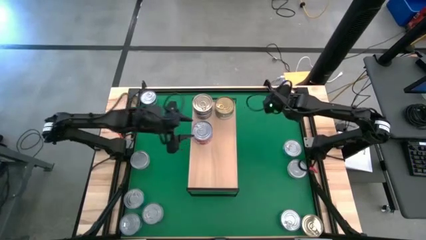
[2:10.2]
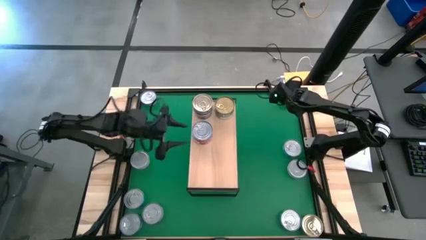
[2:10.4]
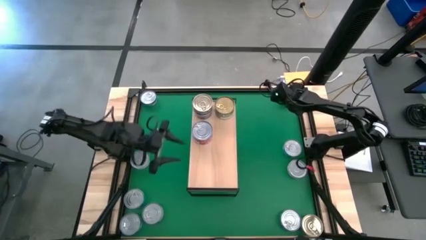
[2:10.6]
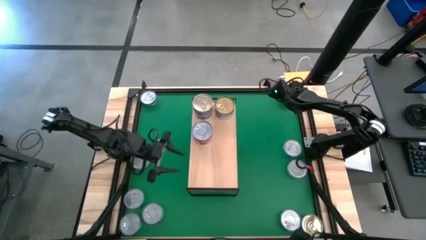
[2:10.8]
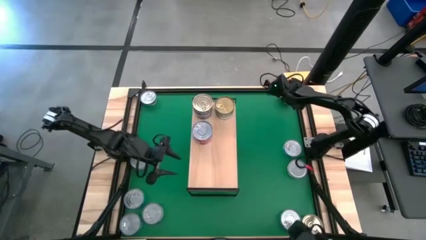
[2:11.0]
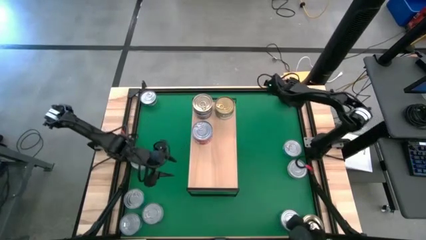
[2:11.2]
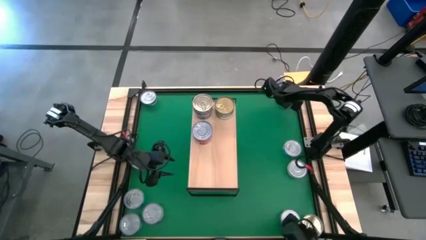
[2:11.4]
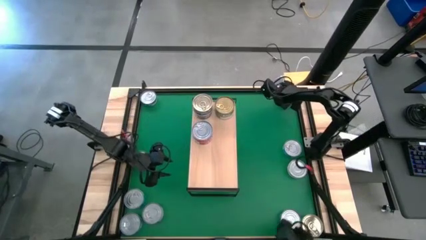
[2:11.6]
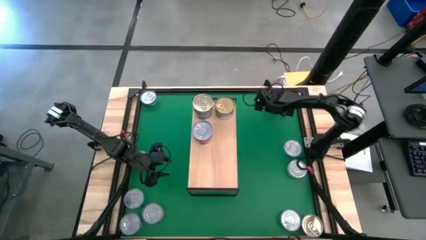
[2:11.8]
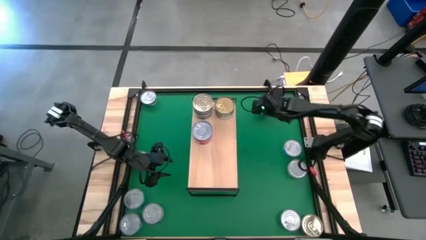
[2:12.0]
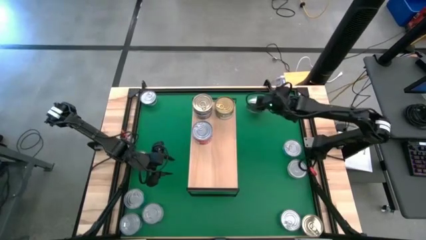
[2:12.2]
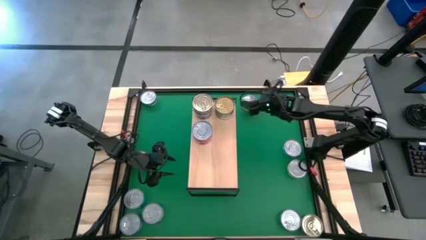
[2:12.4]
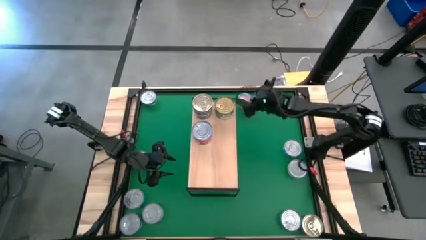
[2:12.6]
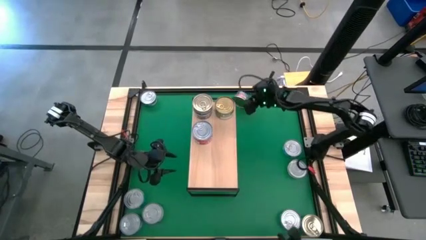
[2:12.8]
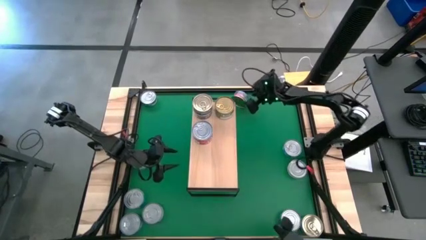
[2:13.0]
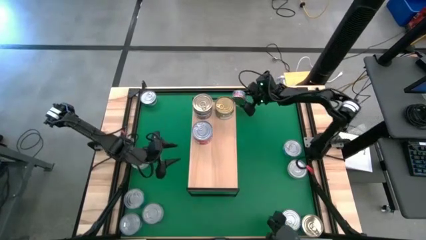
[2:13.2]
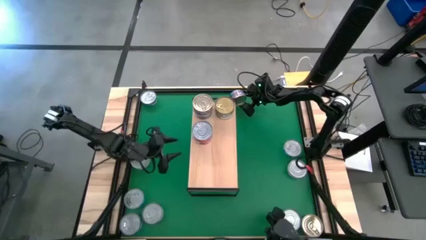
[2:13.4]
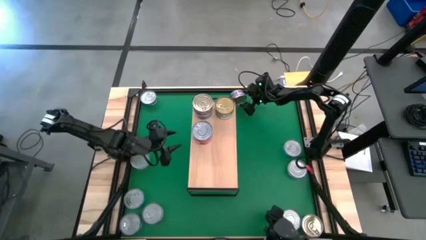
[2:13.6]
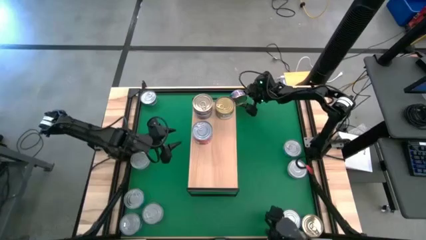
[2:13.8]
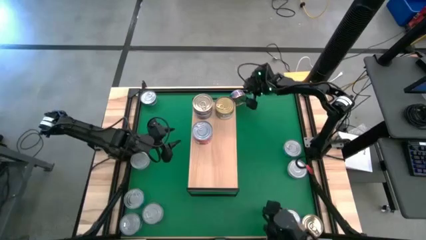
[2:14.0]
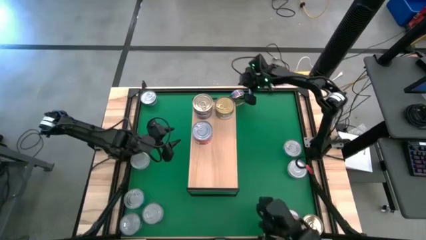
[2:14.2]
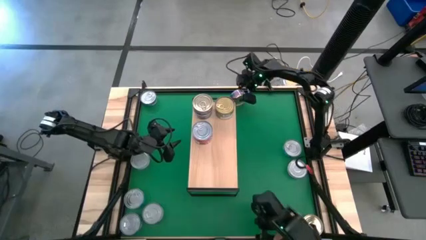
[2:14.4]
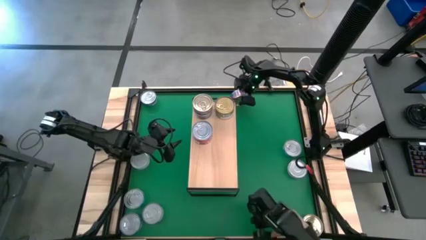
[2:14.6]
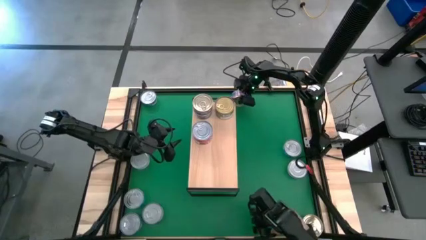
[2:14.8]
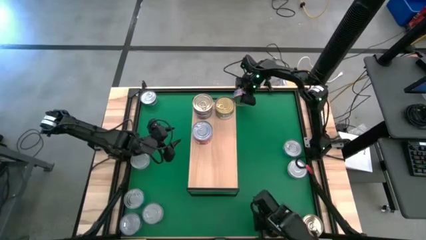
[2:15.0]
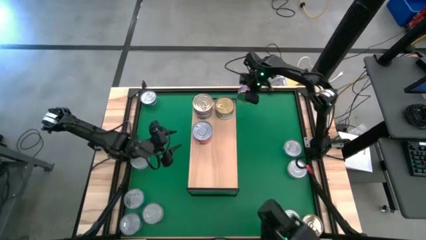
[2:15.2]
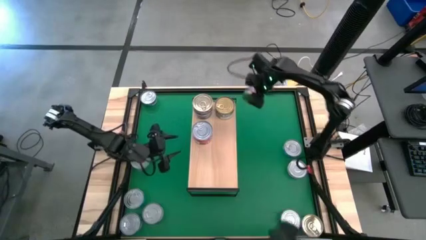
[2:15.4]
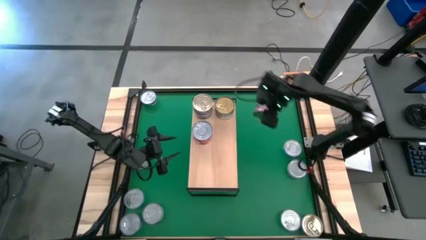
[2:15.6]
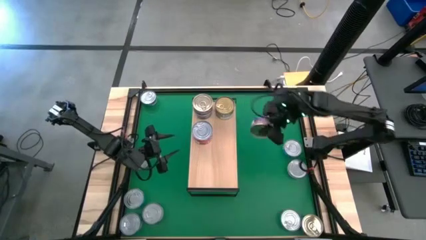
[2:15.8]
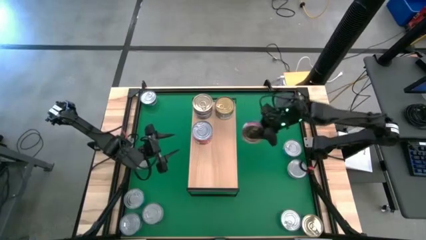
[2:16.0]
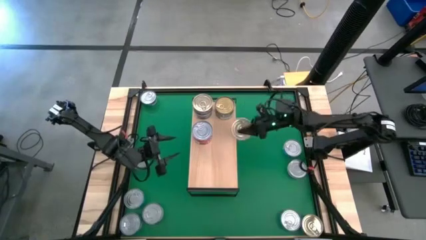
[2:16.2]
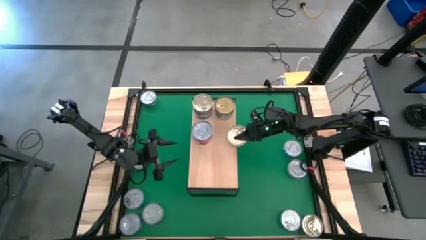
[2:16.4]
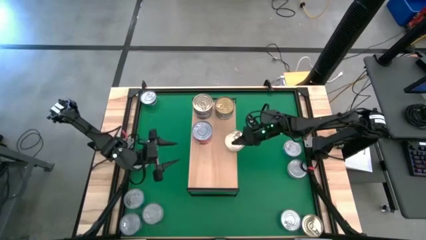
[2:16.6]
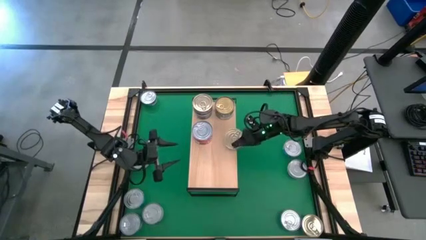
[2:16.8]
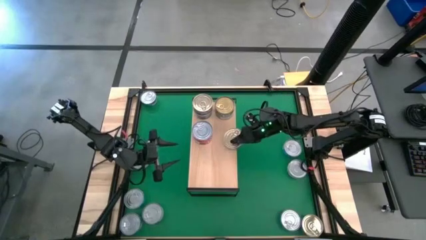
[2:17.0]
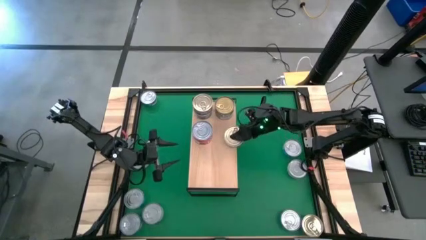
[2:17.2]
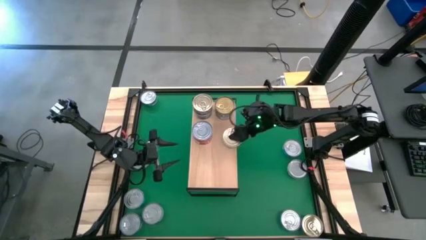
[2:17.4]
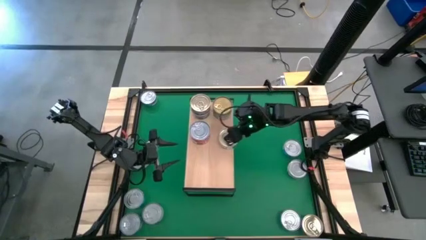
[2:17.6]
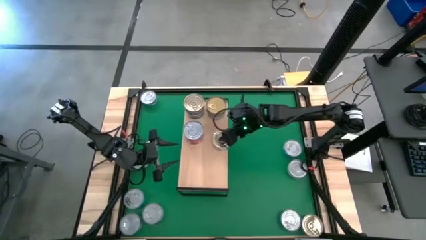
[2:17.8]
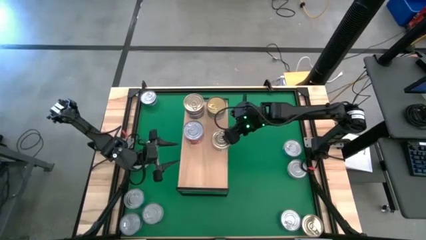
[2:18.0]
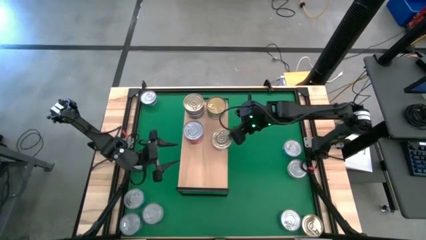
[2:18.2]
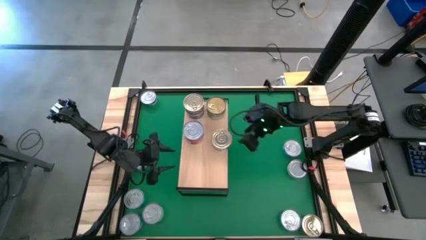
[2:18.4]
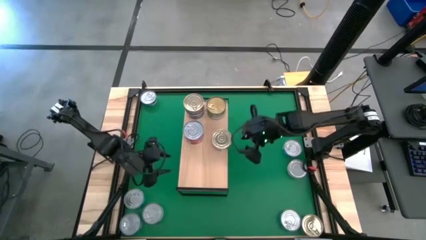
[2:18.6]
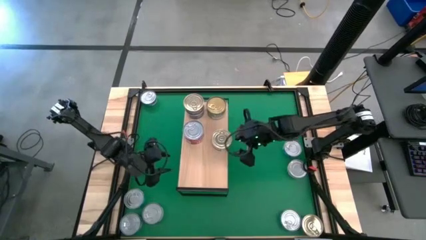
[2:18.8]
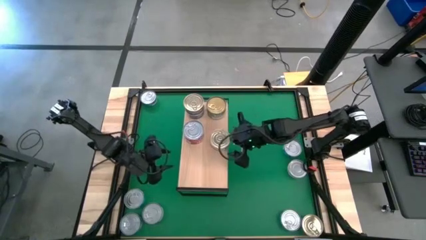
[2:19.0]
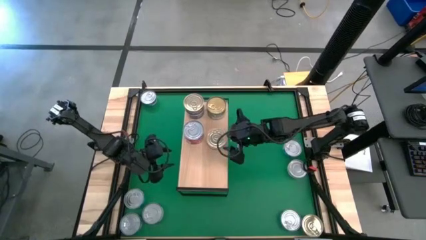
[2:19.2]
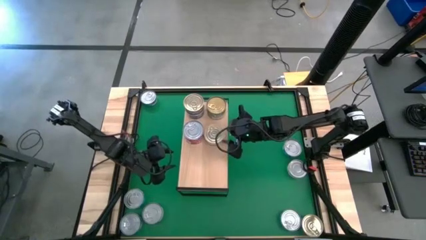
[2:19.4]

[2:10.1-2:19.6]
Task: Stack canned seafood by type on shelf
Put the blue pink tuna can on the shelf

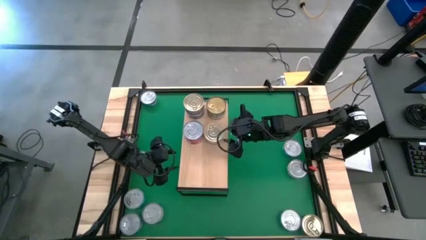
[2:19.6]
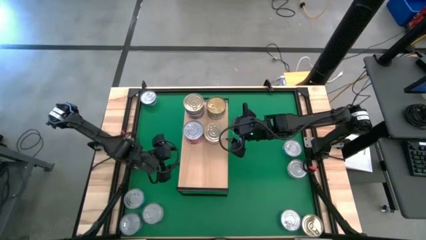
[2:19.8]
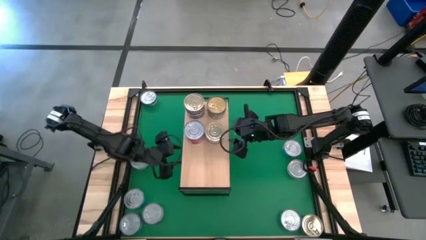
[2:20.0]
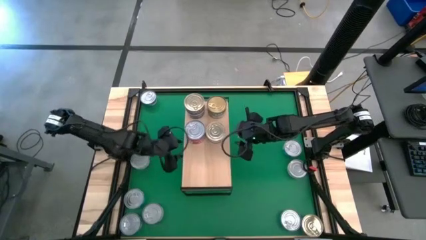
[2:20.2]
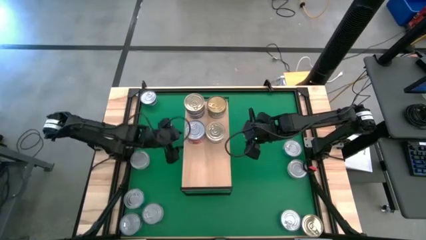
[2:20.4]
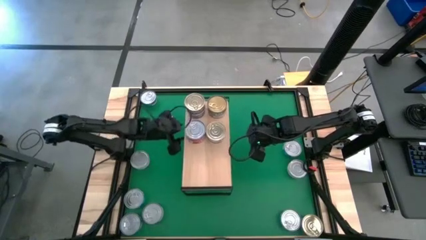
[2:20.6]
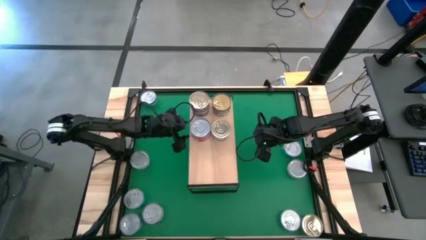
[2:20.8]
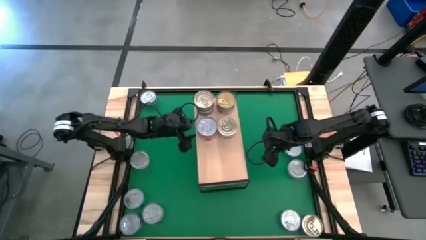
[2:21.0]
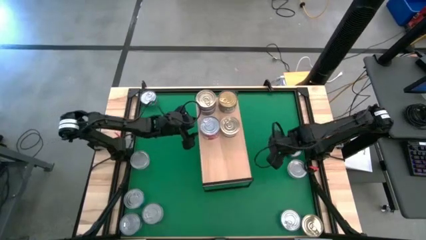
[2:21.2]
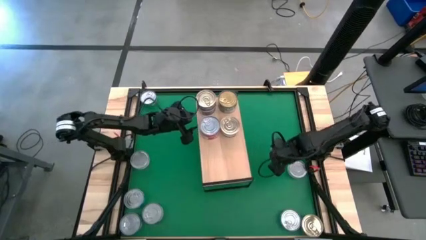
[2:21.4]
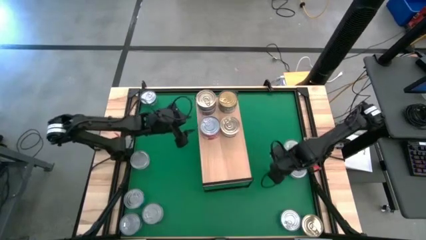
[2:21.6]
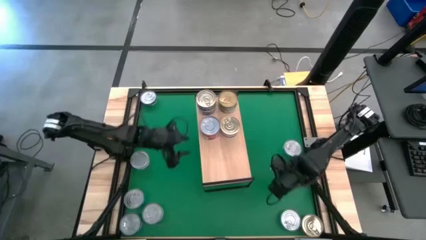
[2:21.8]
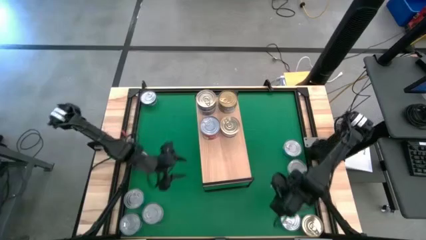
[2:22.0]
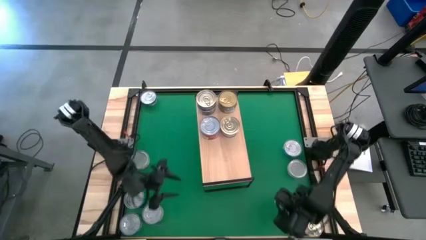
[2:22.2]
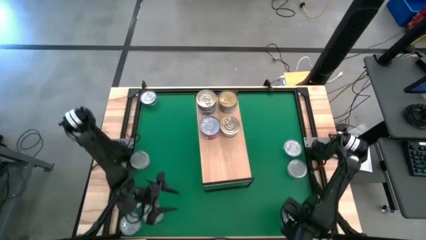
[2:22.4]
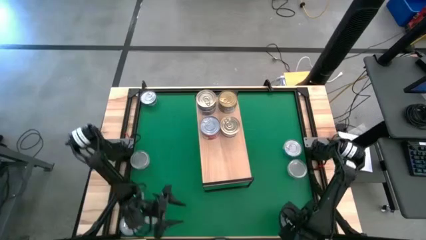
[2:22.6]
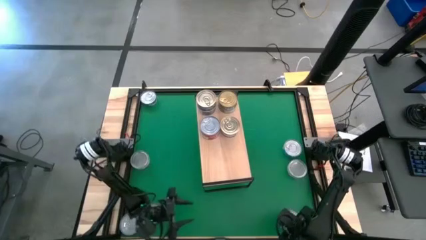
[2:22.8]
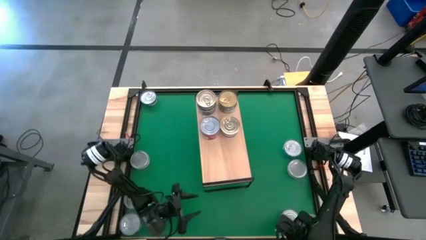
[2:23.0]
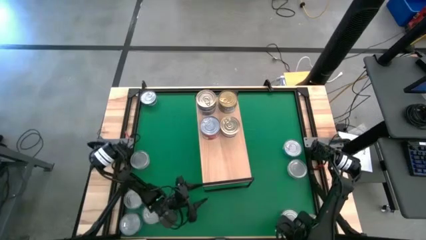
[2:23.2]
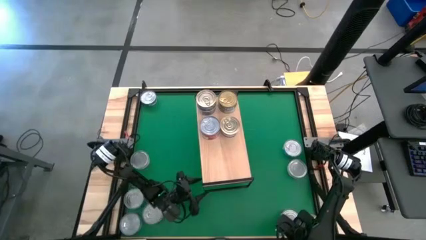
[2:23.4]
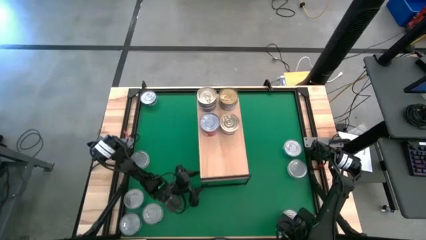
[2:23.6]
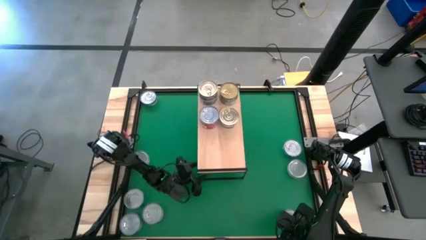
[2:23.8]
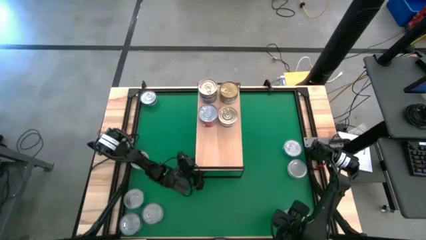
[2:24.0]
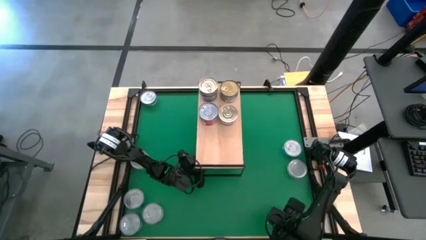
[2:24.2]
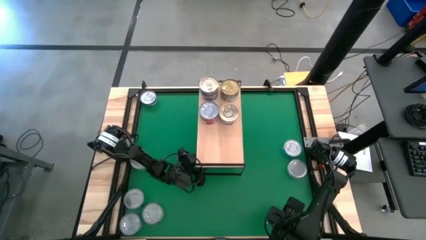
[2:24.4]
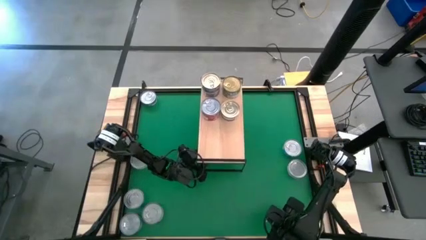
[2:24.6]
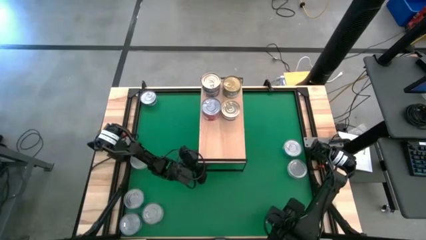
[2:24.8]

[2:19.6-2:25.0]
Move the shelf to the top of the table
